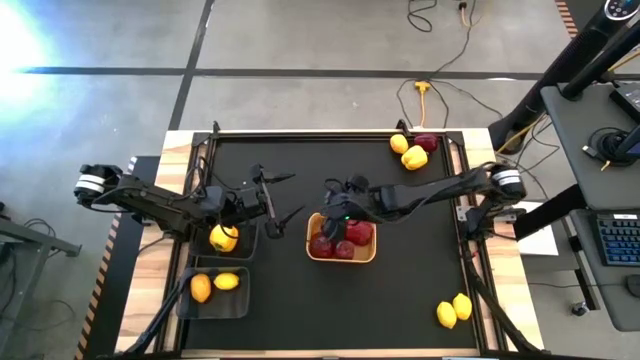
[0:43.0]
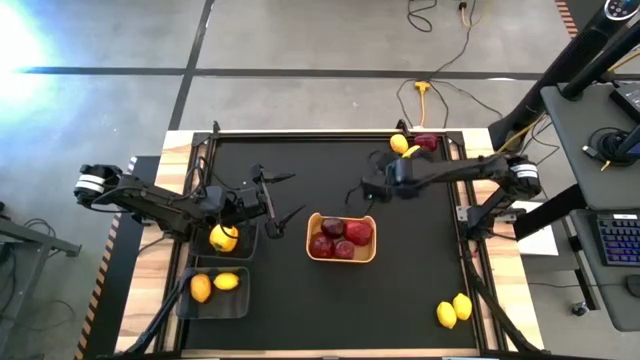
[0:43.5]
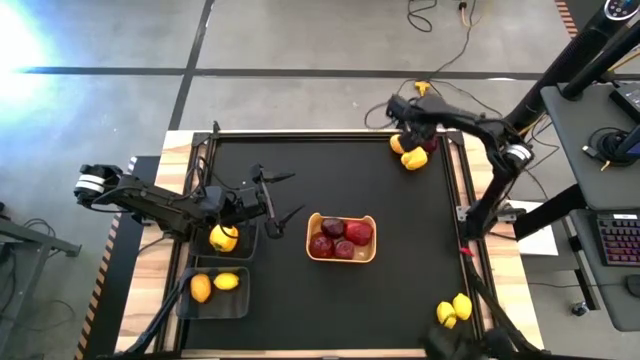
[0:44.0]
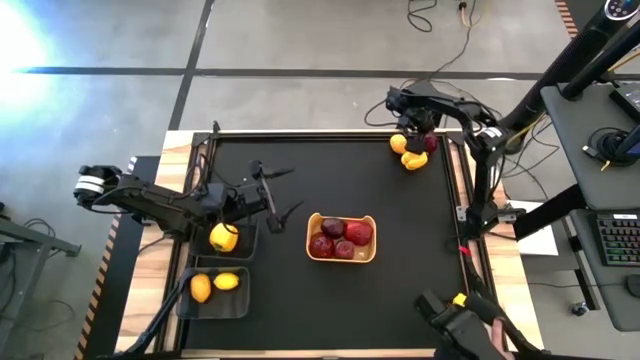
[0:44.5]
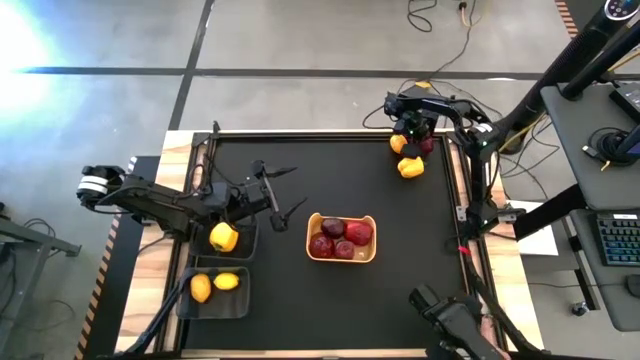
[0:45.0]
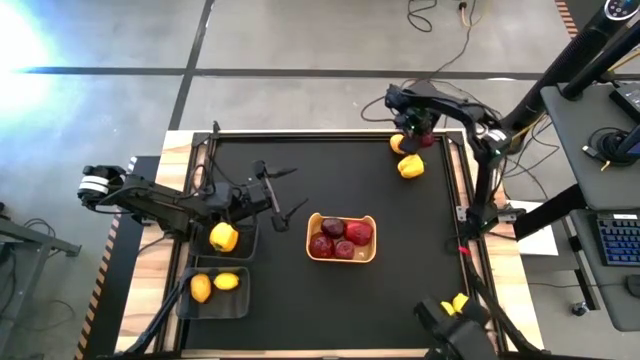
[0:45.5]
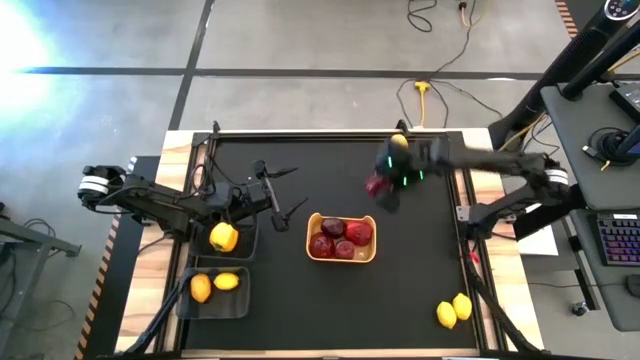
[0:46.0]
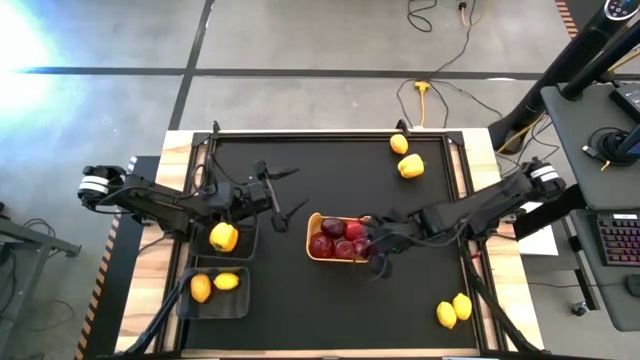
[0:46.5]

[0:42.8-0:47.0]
Task: Sort produce into baskets
Put the red apple into the yellow bin

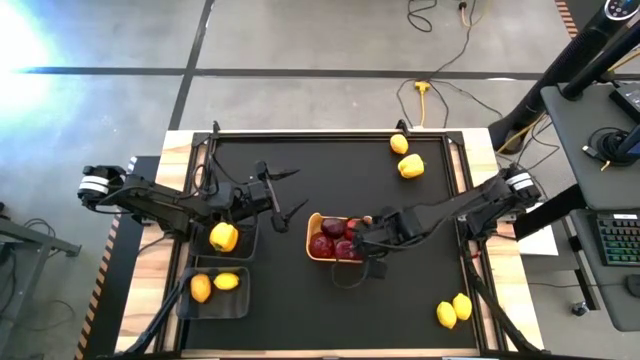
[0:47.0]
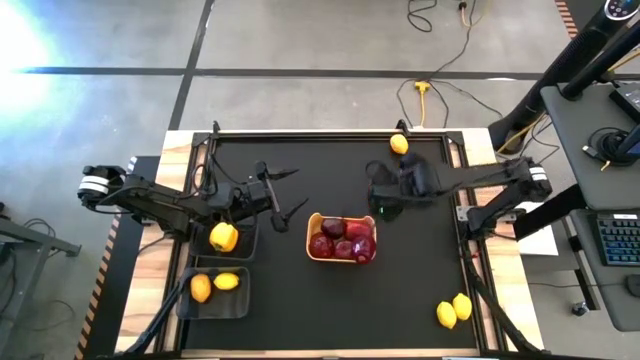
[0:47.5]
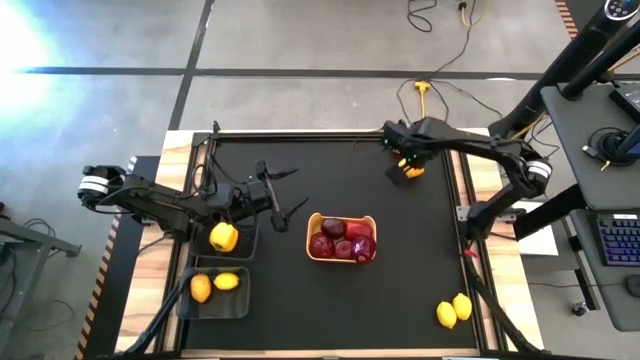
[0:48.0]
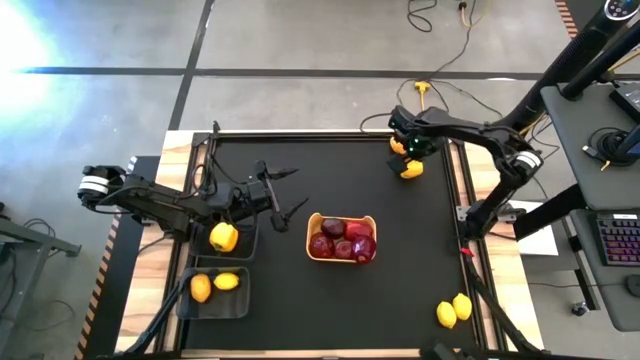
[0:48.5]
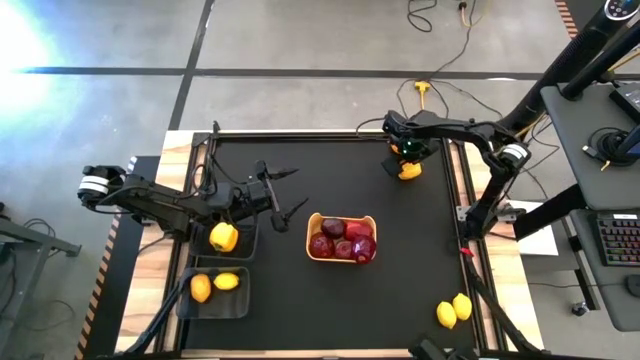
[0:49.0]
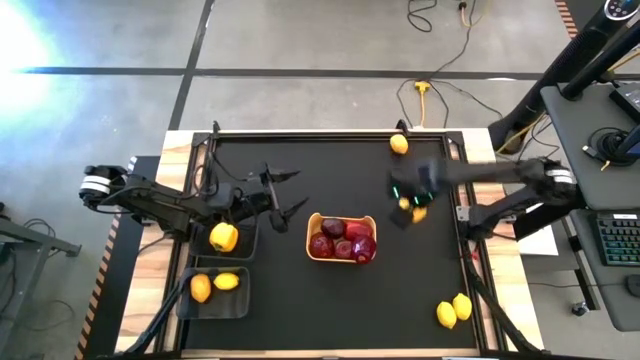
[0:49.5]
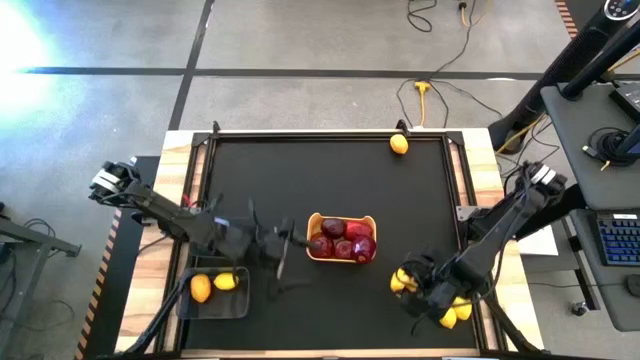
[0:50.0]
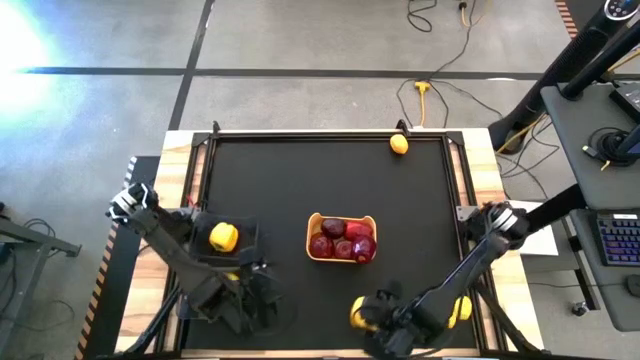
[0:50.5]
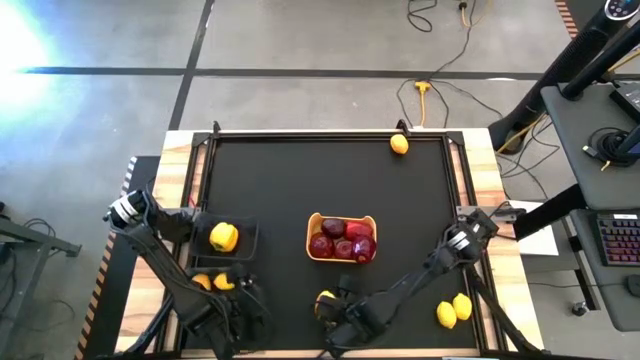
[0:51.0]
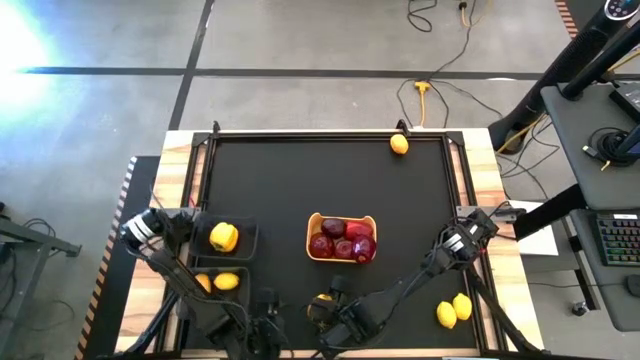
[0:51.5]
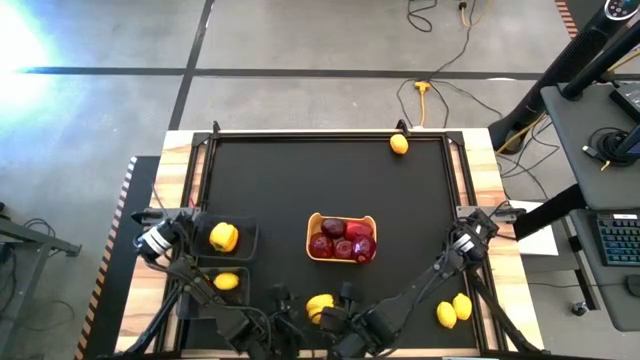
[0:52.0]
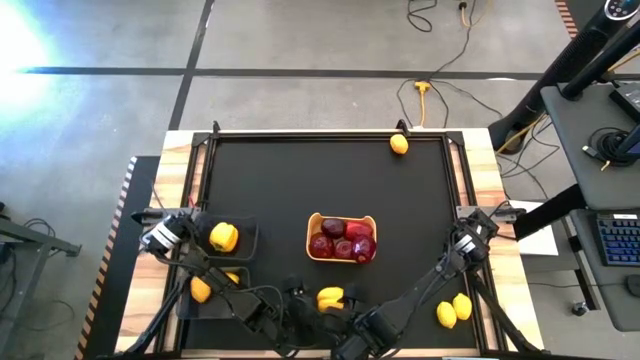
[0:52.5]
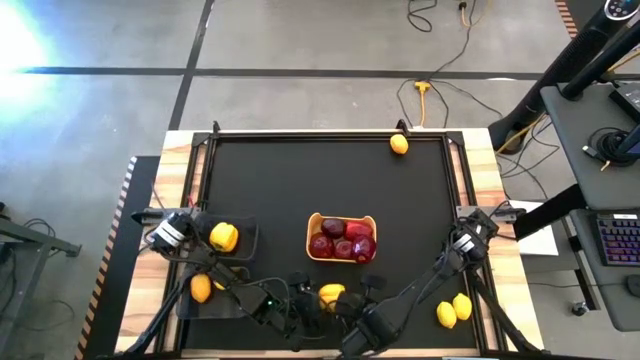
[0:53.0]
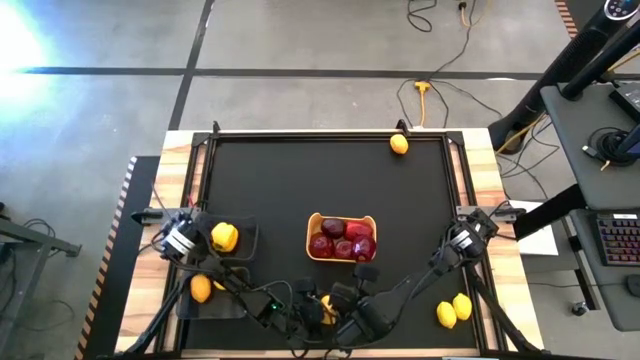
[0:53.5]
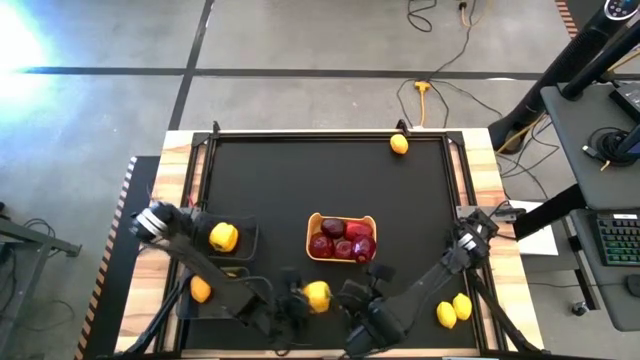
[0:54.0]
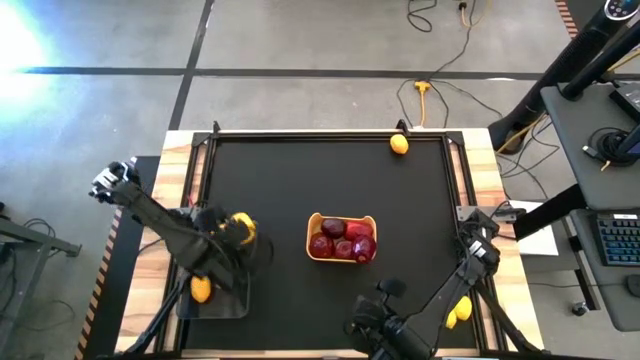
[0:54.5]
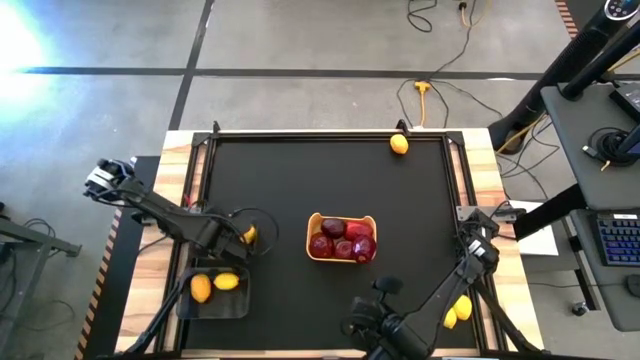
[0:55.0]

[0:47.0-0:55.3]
Put the yellow bell pepper into the top black transparent bin

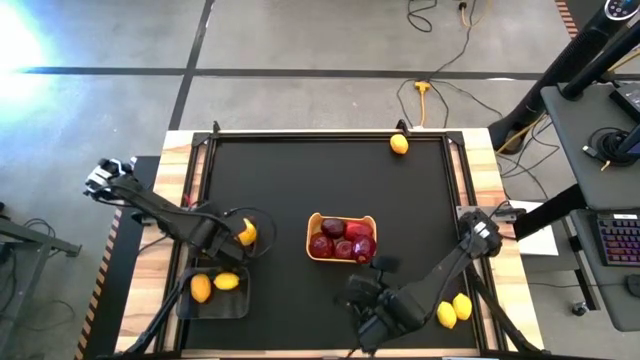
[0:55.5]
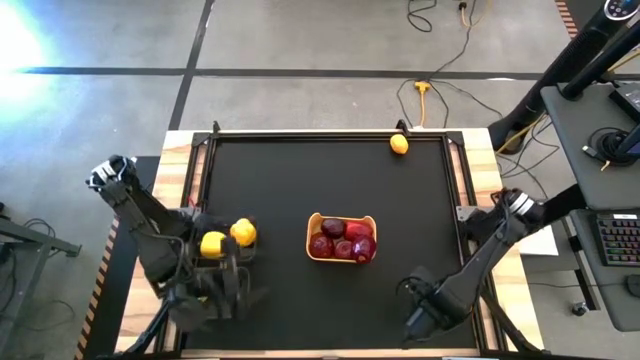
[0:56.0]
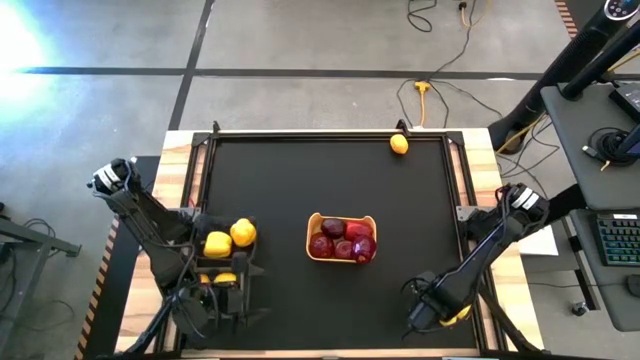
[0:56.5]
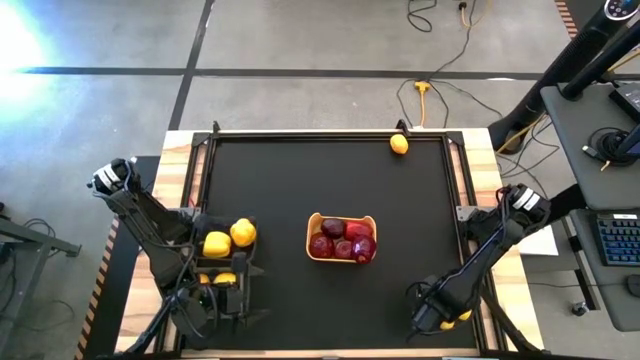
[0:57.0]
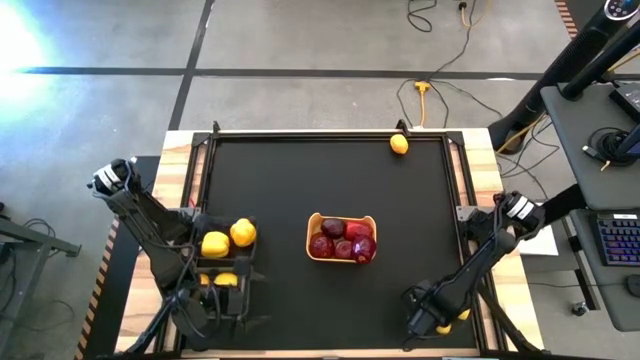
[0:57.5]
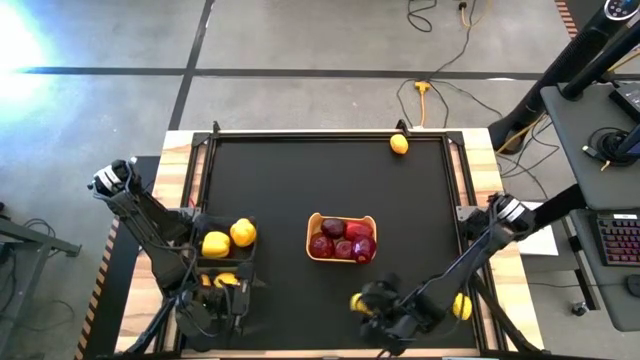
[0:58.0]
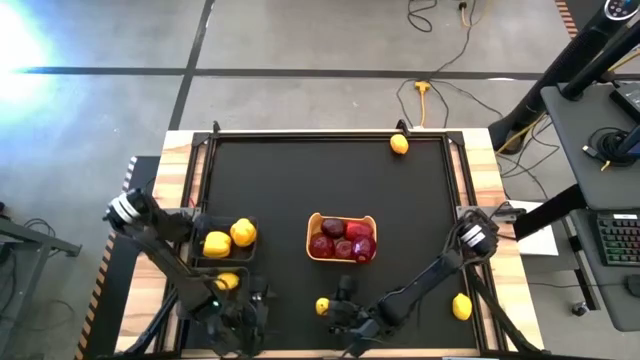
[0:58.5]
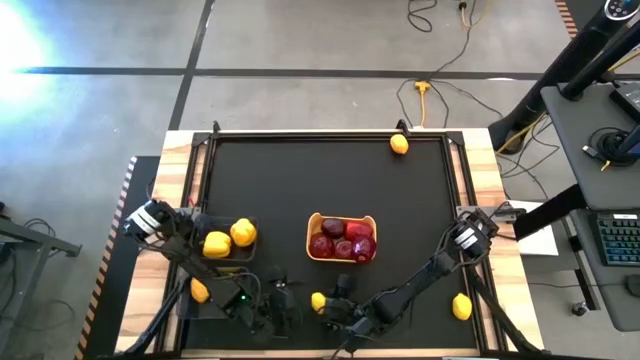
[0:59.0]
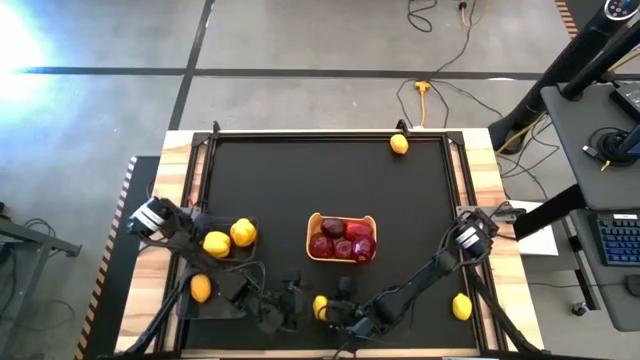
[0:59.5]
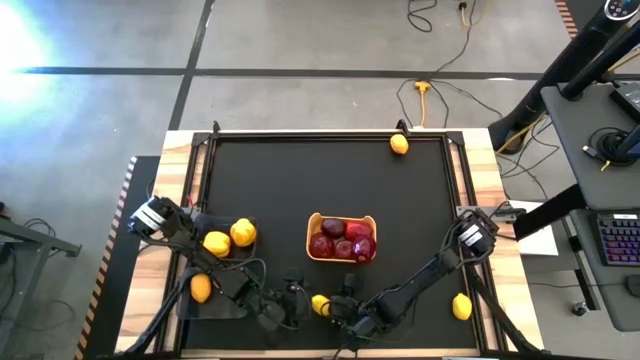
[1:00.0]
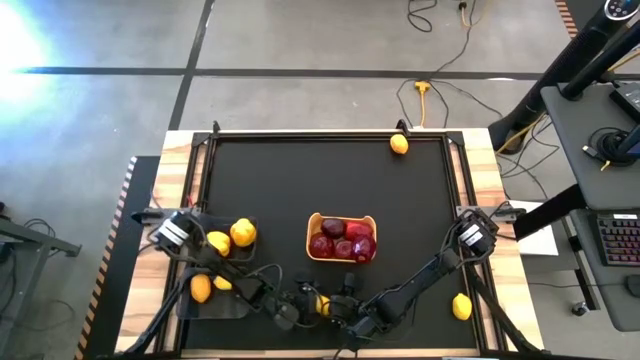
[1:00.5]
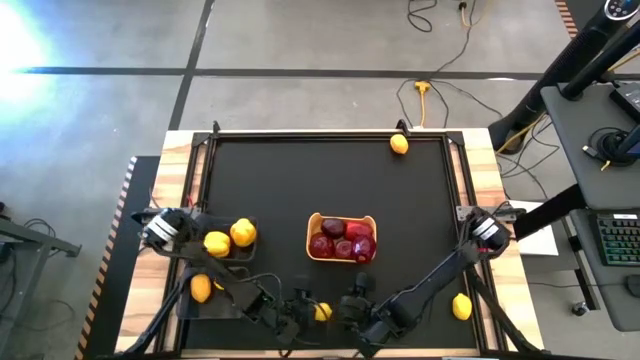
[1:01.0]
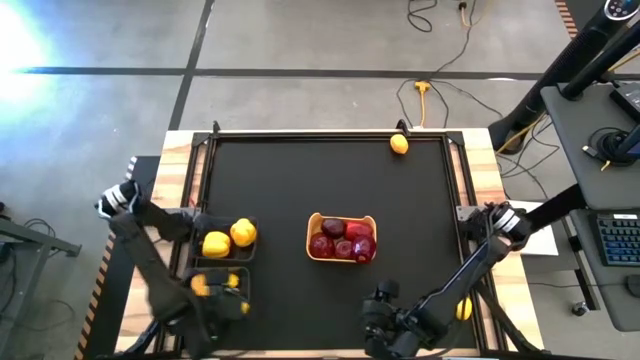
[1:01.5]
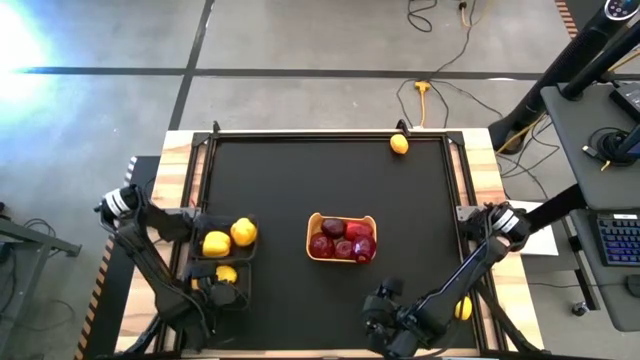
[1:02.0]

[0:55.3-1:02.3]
Put the yellow lemon into the bottom black transparent bin

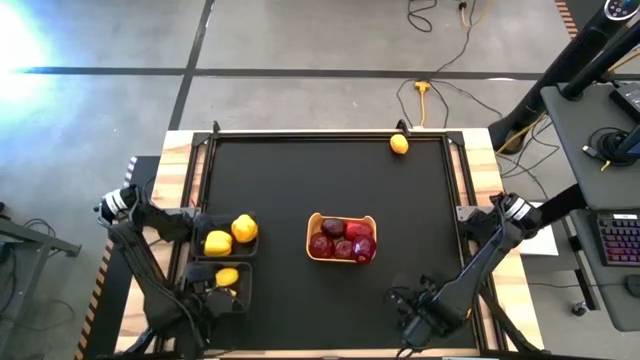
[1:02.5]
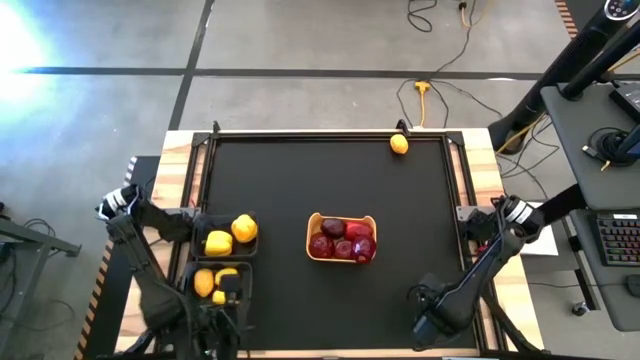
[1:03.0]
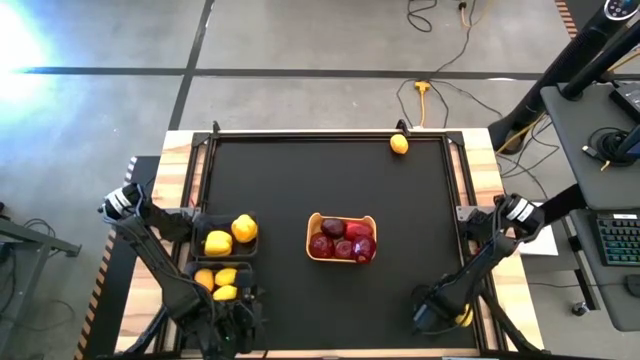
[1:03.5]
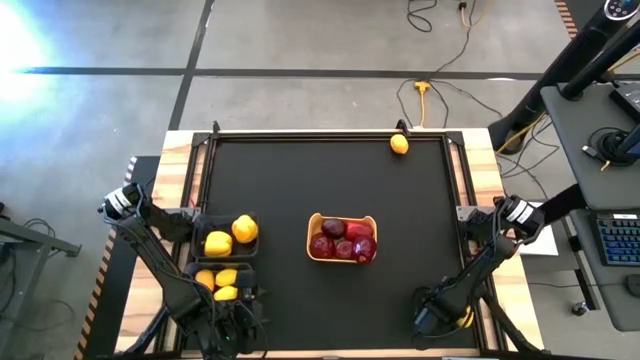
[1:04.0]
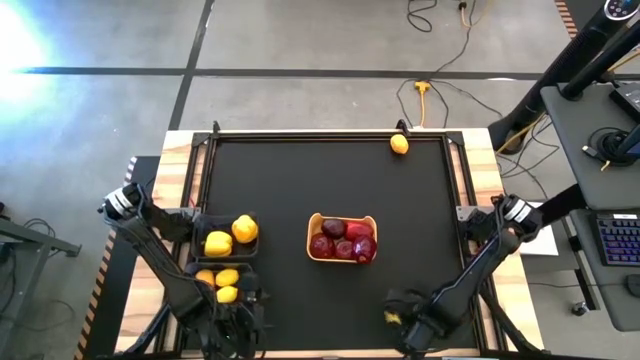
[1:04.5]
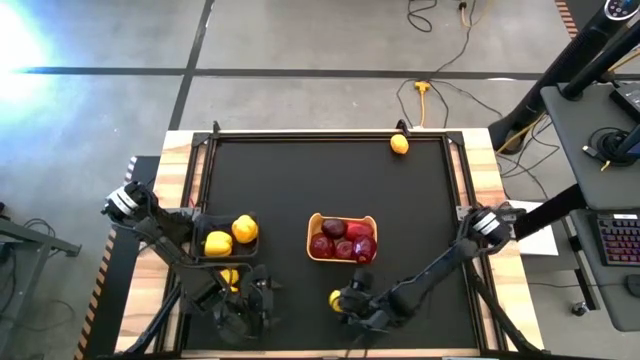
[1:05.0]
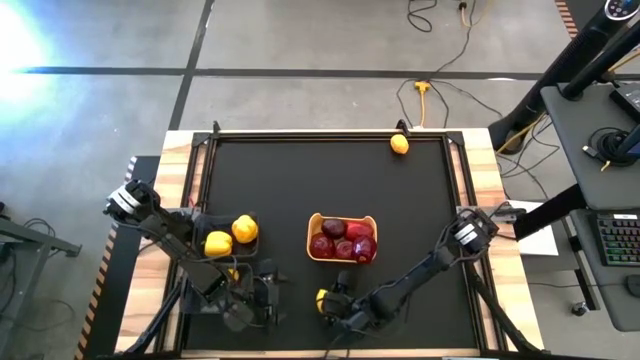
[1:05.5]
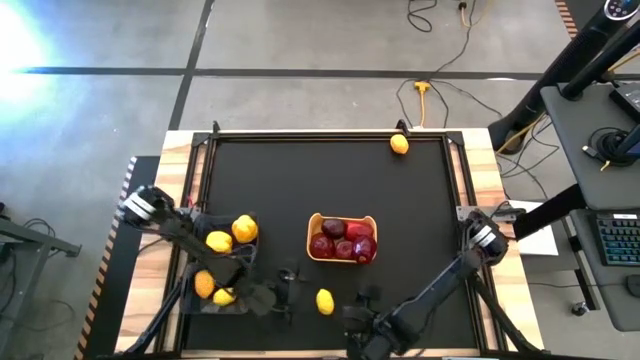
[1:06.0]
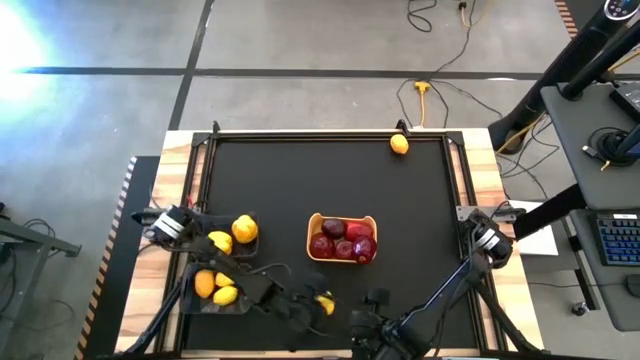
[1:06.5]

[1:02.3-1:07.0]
Put the yellow lemon into the bottom black transparent bin
